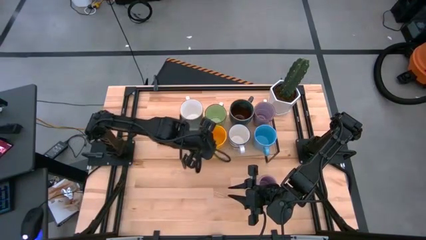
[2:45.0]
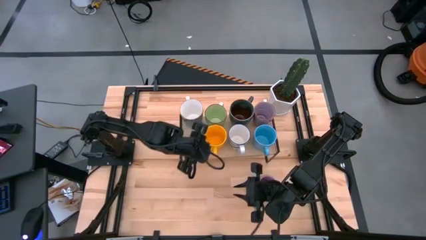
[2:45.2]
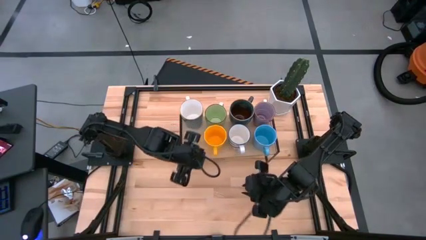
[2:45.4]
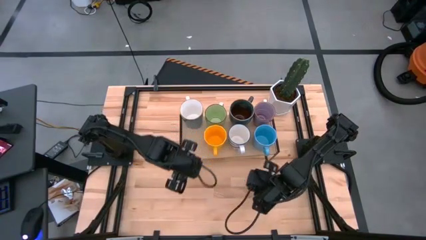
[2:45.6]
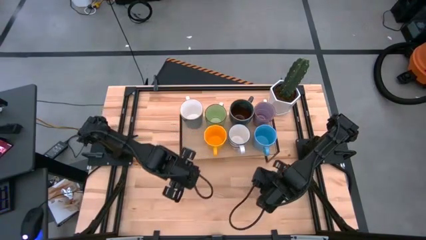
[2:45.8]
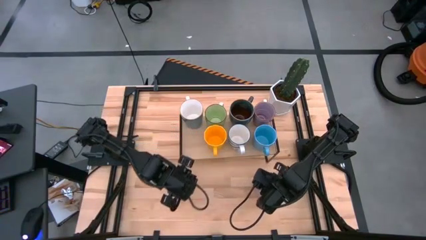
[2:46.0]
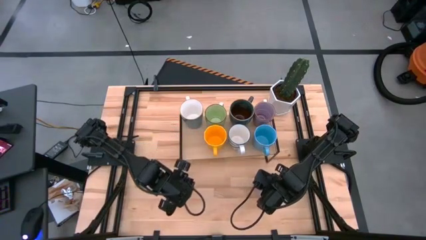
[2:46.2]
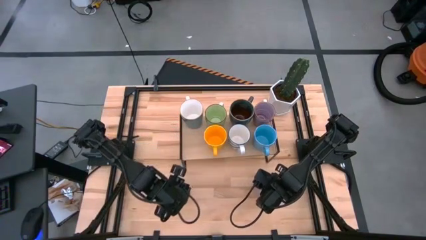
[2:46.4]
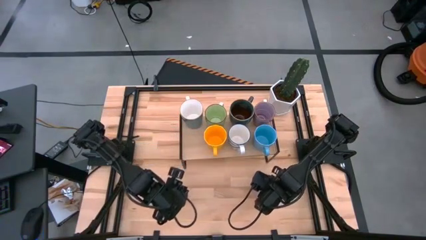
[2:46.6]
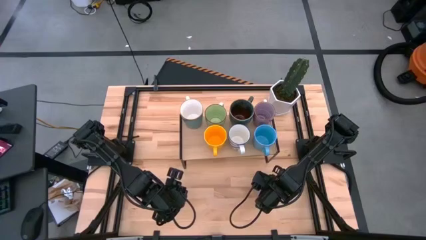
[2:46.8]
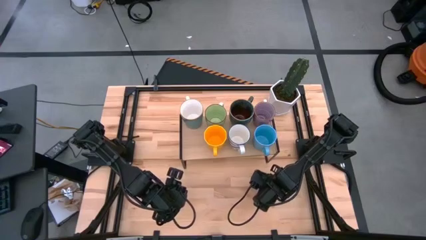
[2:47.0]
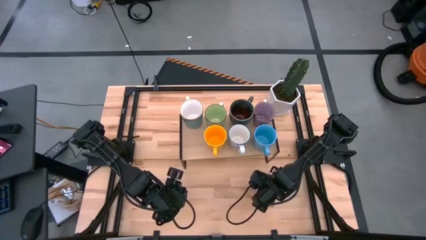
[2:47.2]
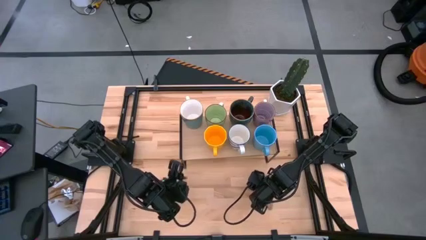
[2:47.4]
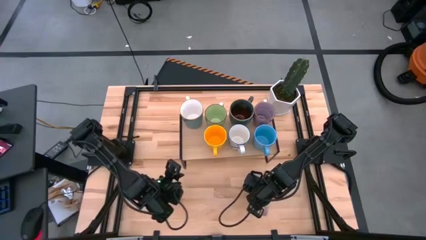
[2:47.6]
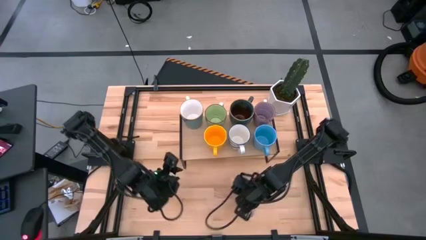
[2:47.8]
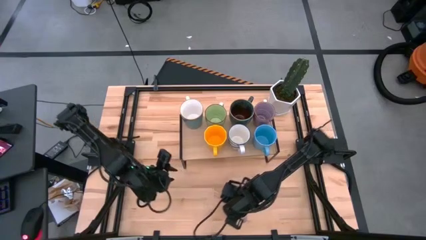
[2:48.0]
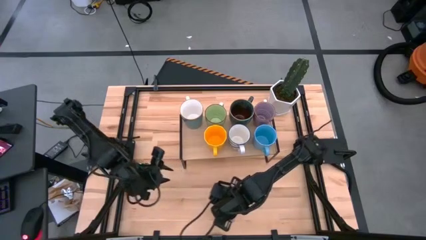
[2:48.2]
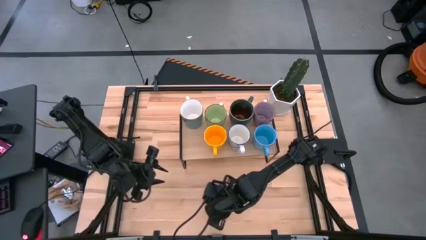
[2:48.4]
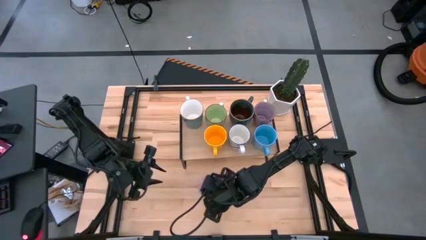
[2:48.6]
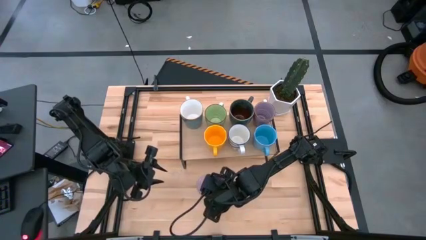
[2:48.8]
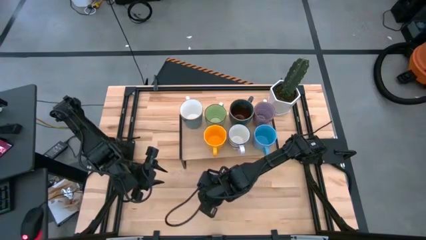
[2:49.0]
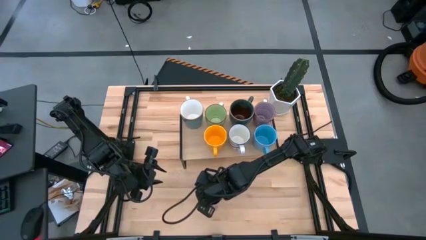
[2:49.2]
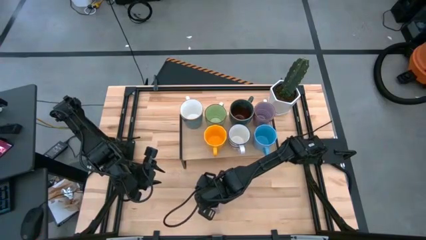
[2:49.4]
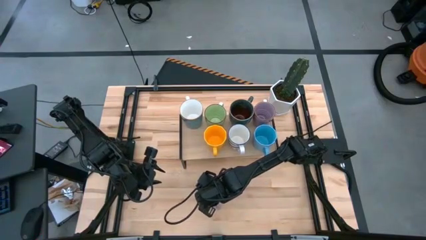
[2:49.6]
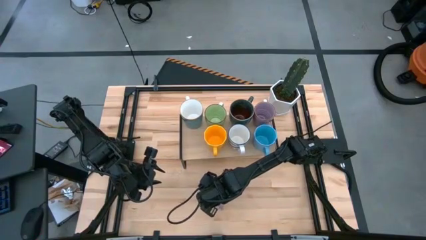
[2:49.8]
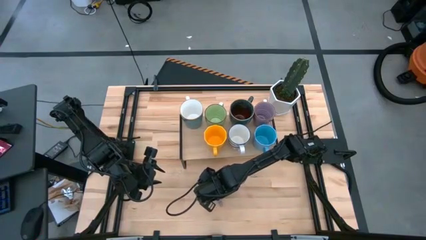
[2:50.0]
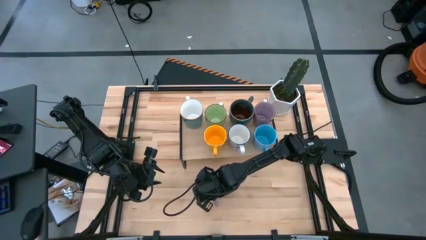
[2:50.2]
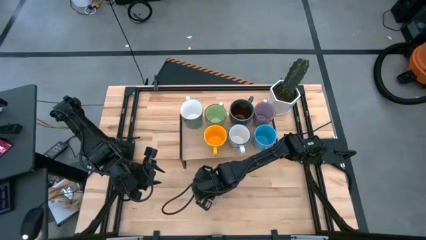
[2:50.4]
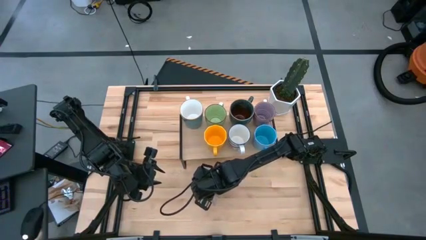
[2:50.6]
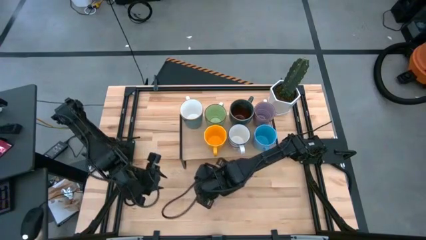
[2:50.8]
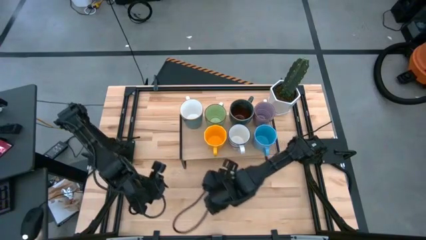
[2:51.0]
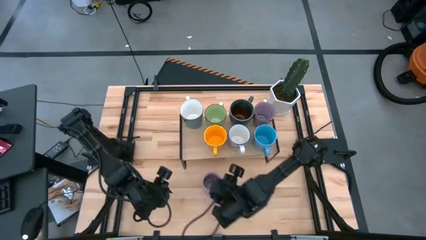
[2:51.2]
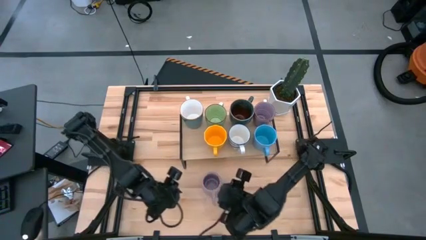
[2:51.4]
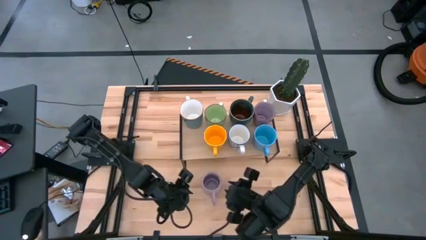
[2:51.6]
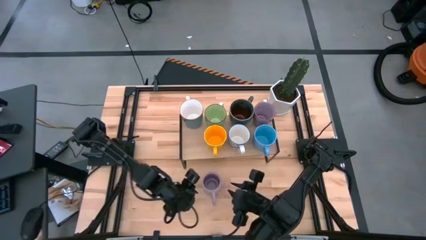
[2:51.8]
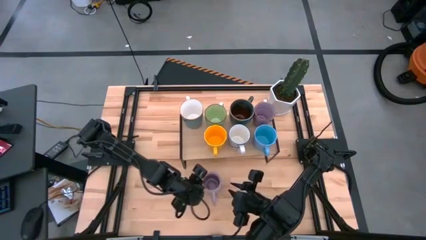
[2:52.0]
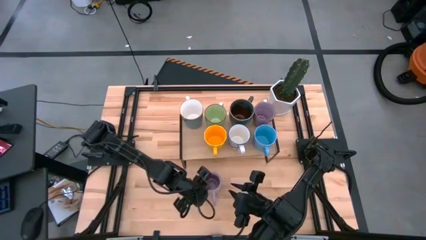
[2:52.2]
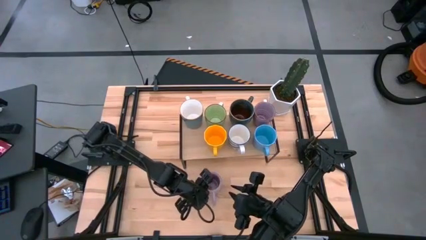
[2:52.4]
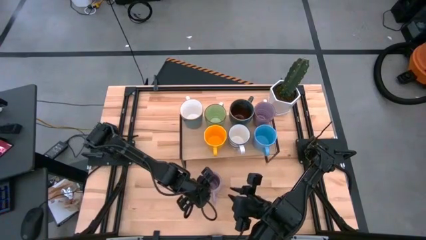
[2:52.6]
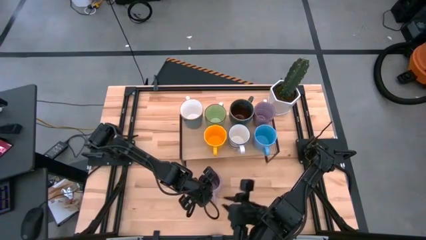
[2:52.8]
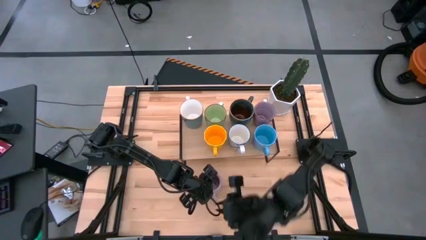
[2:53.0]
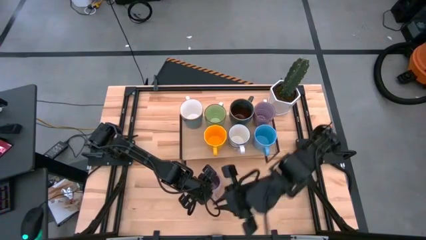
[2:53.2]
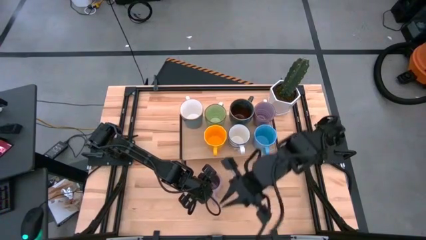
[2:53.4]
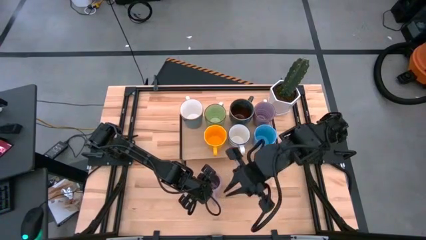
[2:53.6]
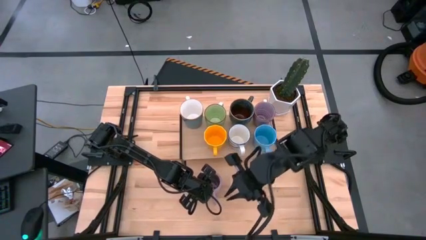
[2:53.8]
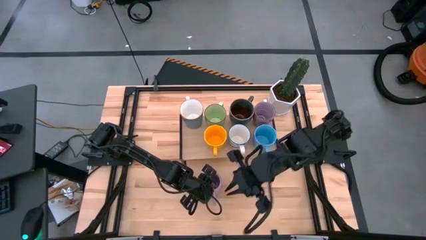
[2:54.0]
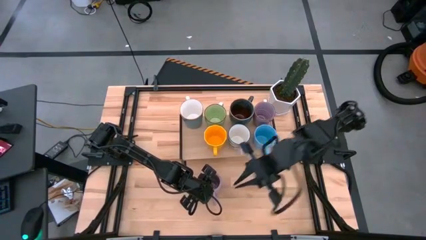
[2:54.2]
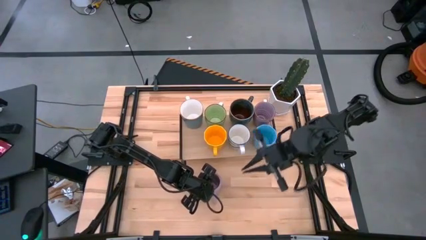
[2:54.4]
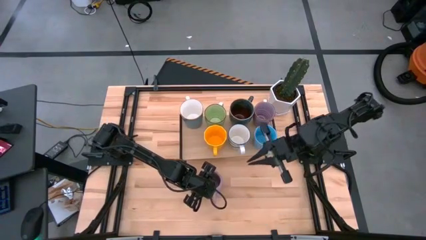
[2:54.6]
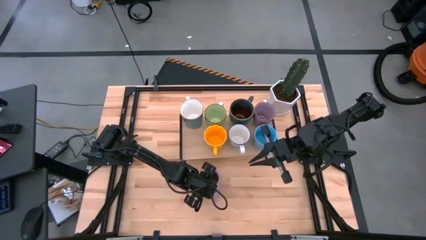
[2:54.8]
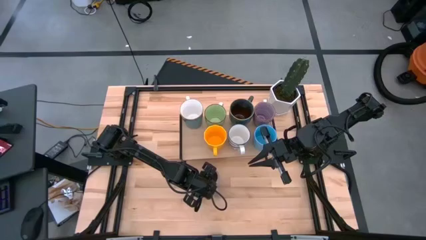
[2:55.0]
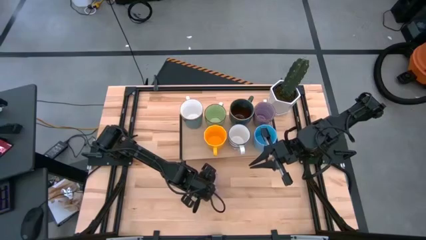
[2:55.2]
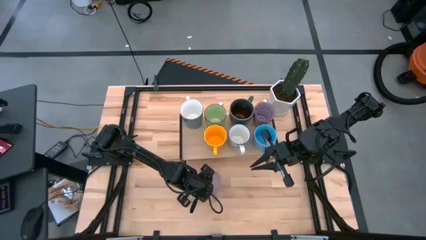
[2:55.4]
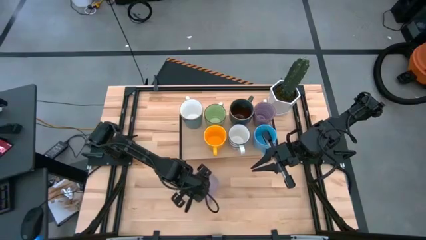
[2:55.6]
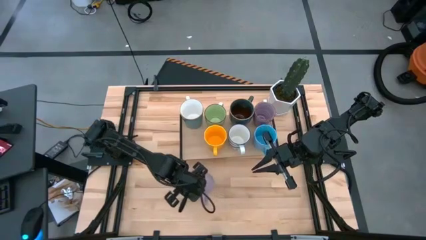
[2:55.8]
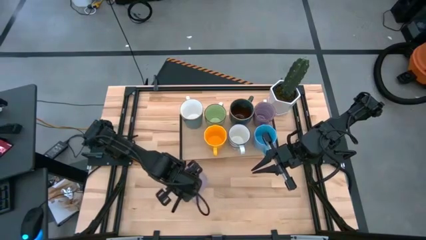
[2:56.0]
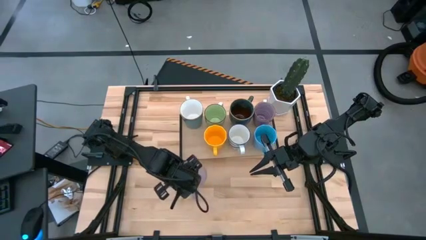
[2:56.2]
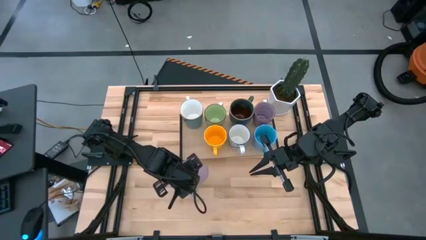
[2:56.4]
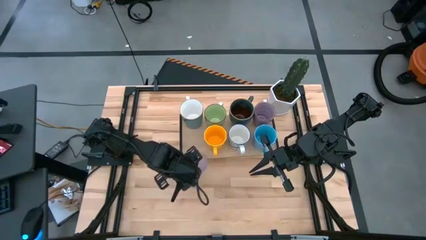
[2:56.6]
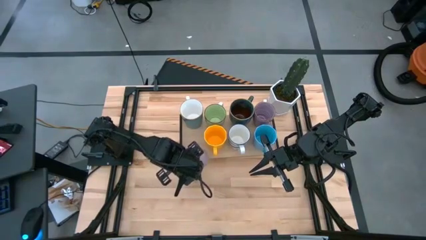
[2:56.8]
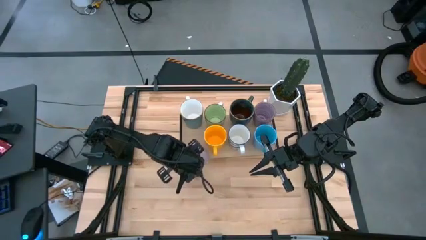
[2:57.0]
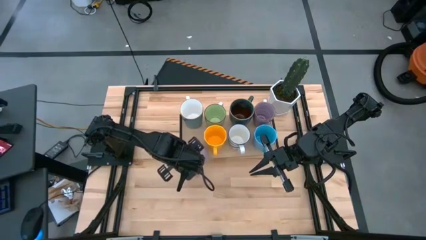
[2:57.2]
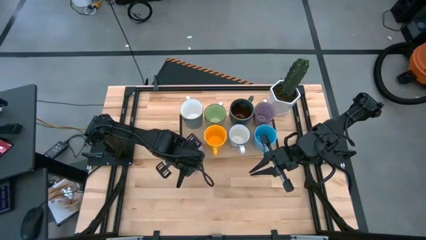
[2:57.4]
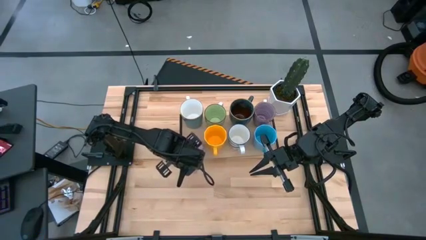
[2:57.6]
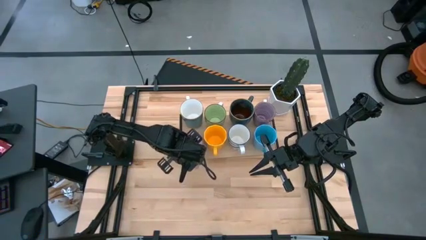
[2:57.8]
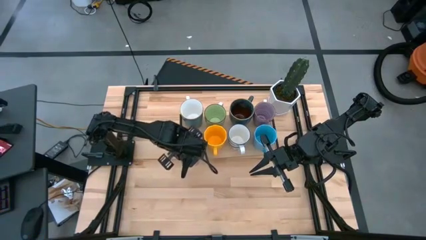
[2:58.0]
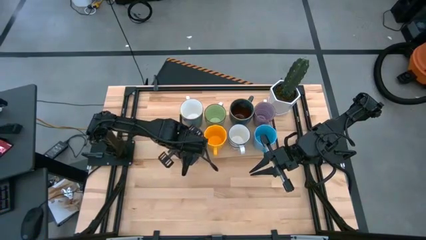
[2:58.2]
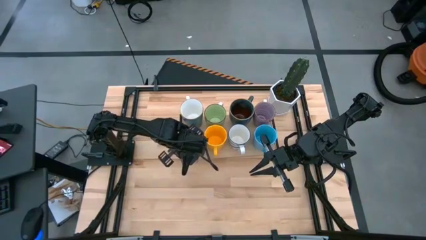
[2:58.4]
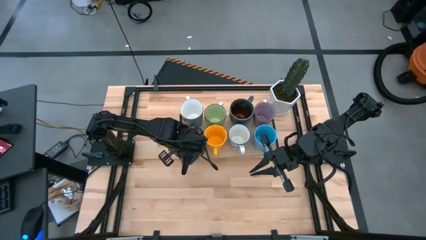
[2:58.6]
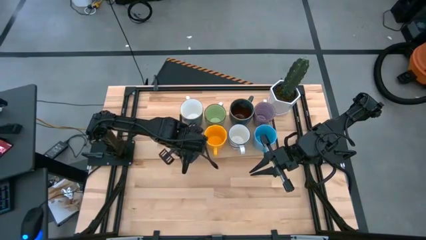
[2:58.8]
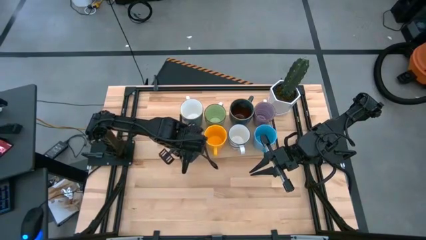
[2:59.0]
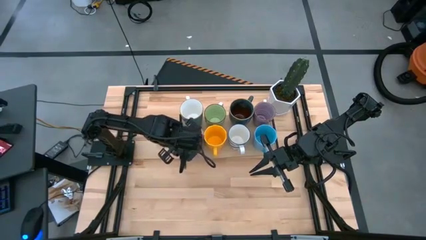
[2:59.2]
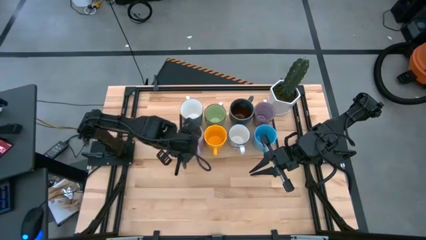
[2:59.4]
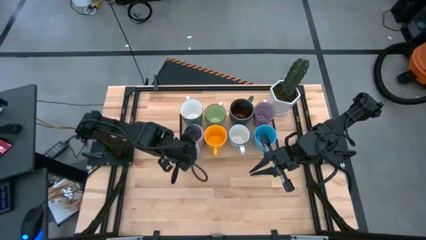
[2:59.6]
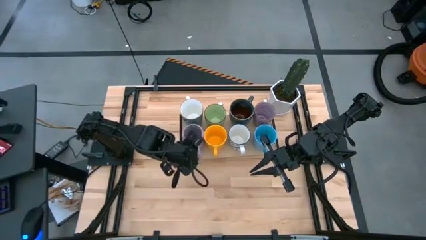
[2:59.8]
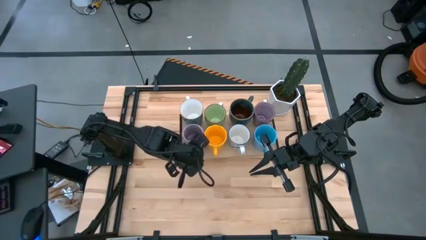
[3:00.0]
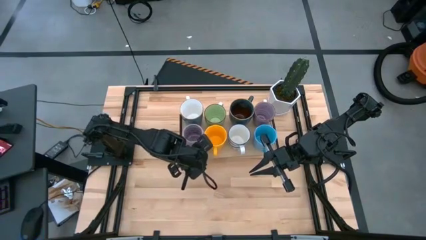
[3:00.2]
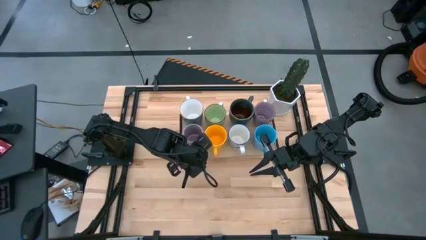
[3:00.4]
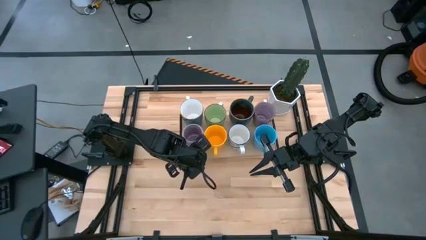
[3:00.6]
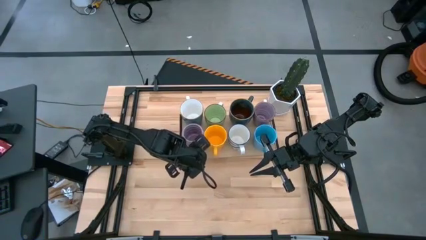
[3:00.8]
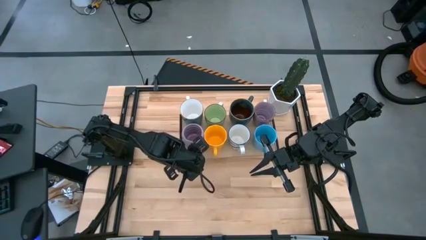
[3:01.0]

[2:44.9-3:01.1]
Task: Place coffee mugs
Put the purple mug on the shelf aligned with the other light blue mug on the shelf
